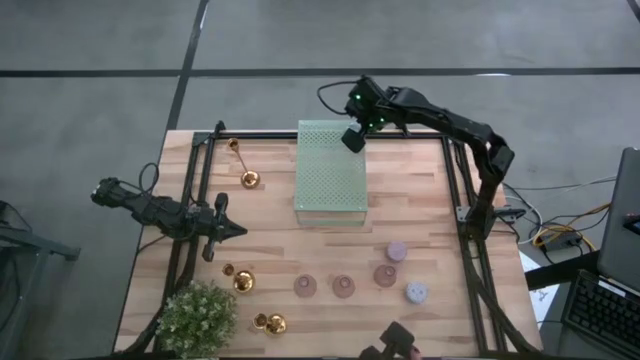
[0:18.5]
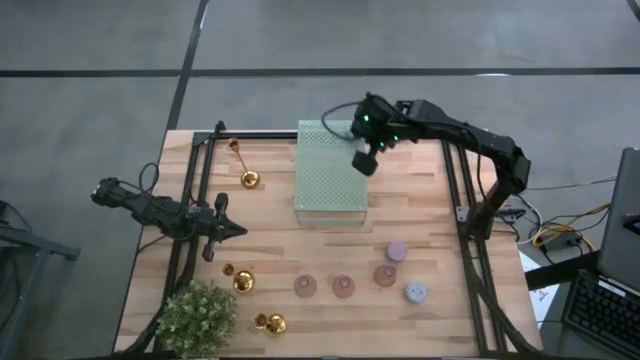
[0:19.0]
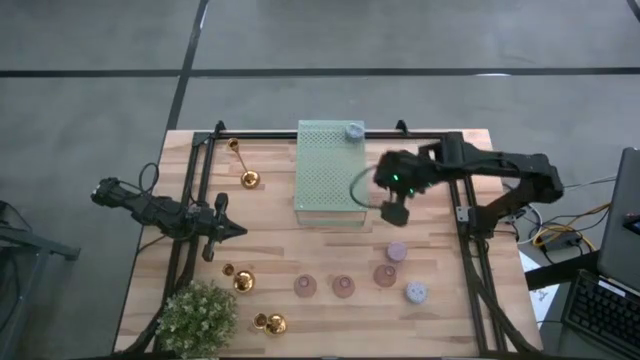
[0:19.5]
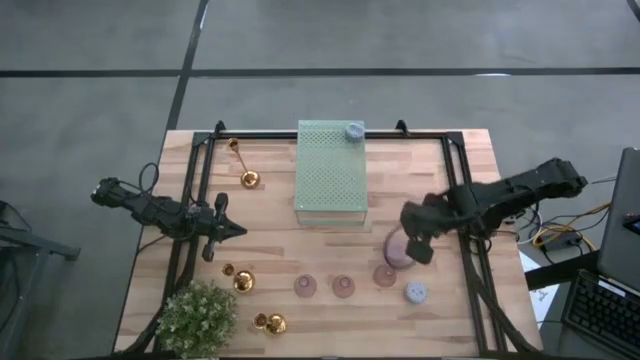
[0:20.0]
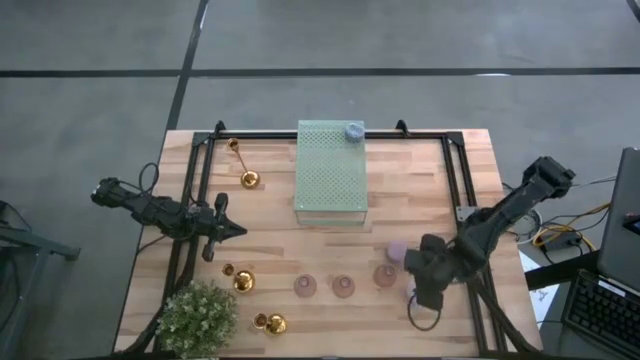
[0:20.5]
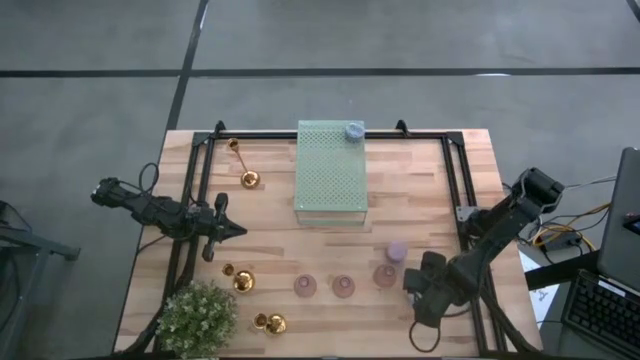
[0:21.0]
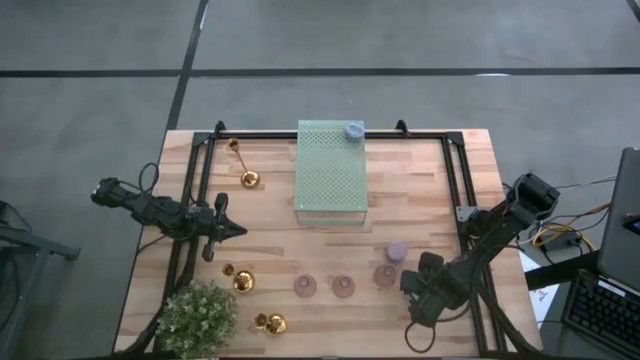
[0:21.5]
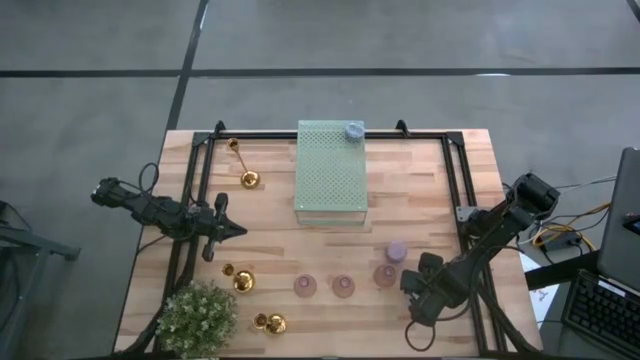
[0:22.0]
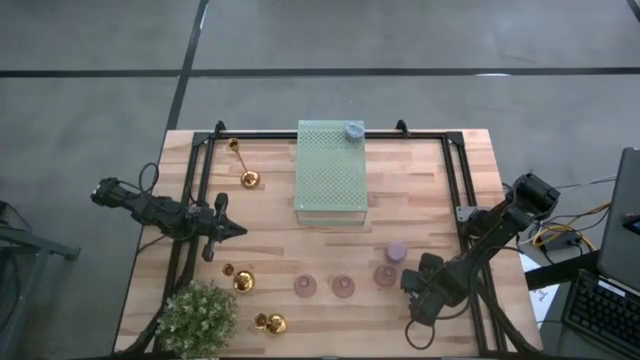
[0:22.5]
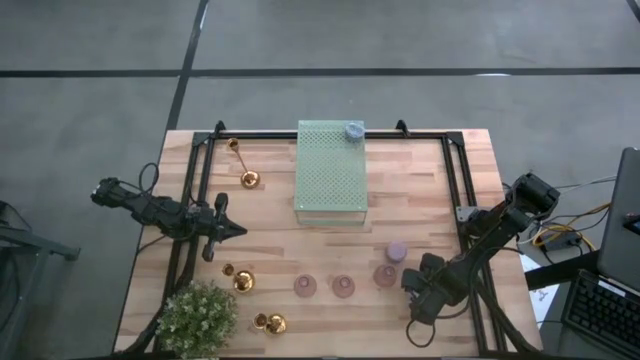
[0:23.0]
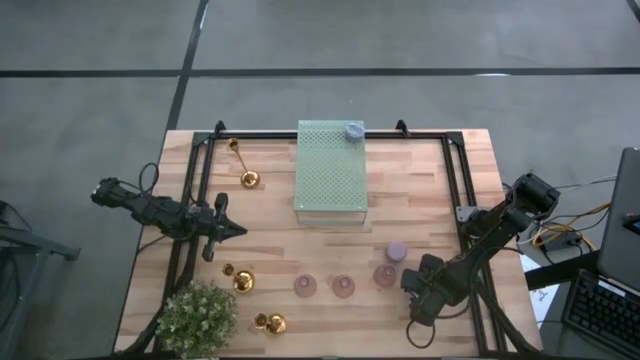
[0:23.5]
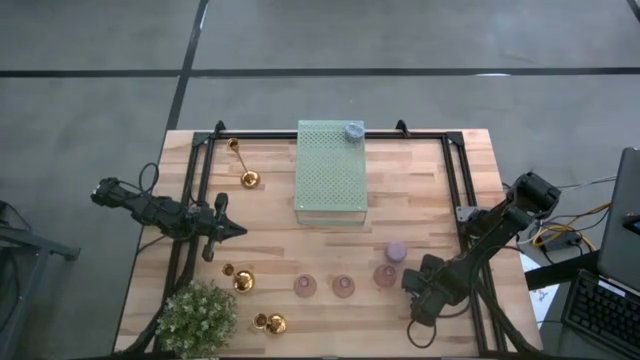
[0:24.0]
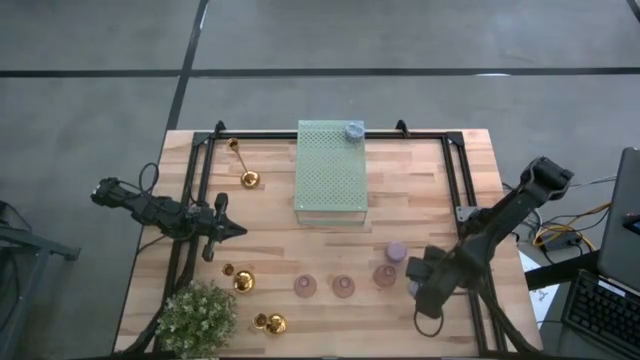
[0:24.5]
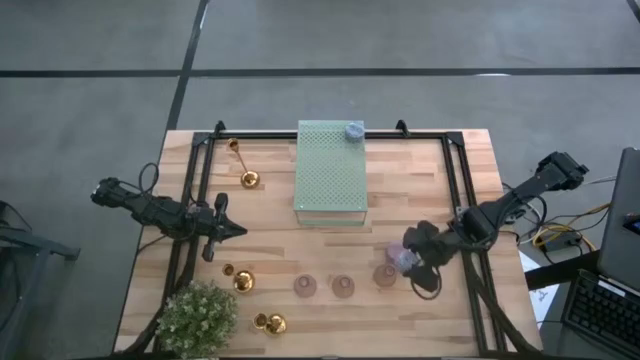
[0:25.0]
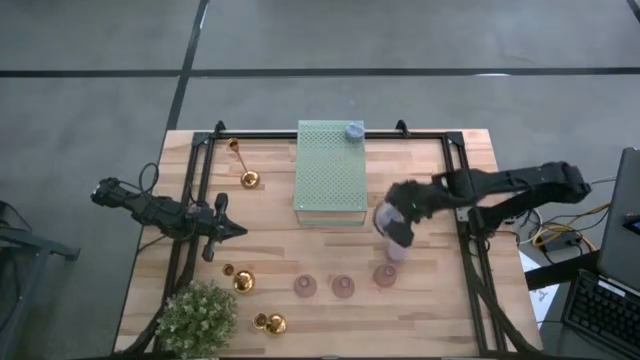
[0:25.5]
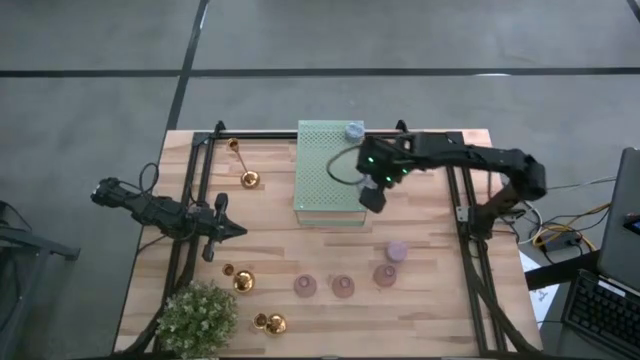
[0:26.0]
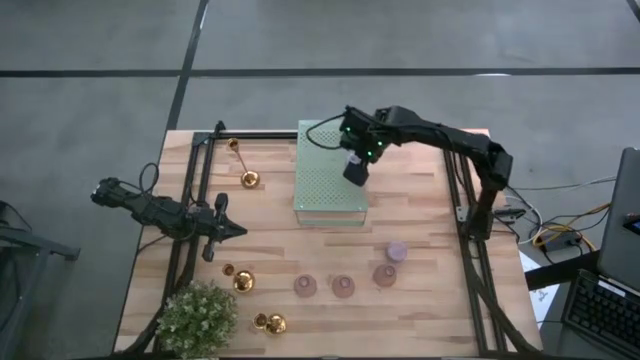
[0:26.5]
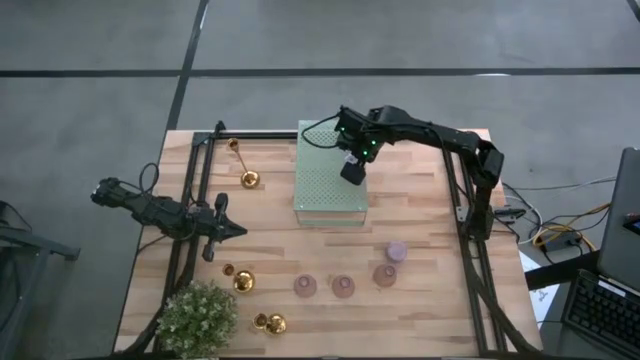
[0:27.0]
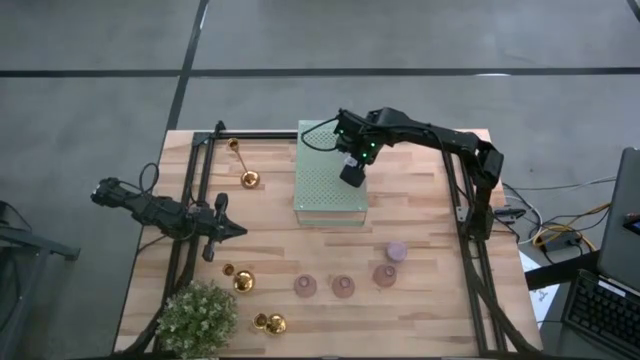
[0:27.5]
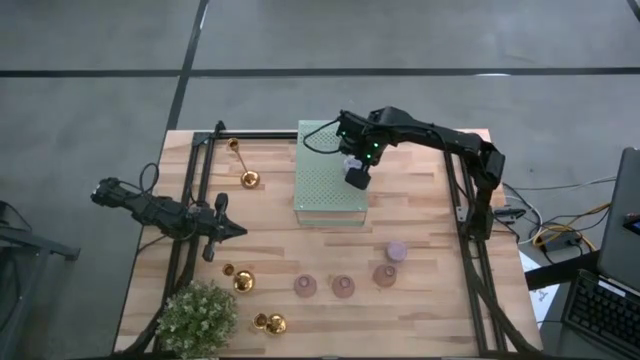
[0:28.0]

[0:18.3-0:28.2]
Task: Pick & Place candle stick holders
Put the white scented candle on the shelf

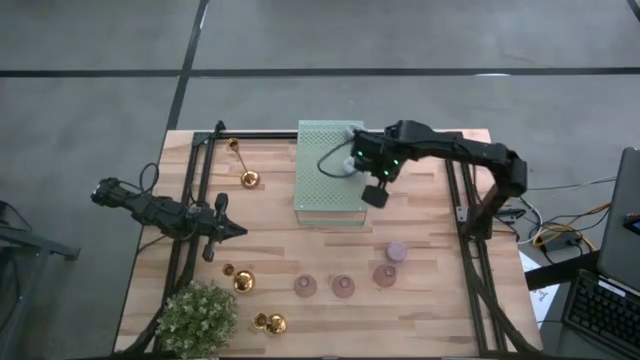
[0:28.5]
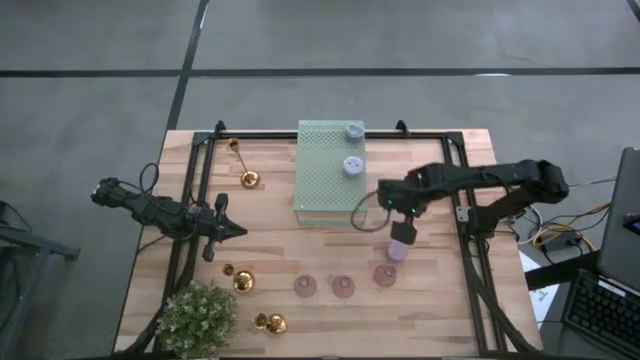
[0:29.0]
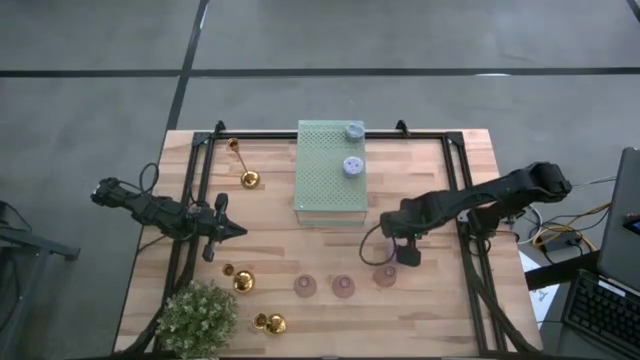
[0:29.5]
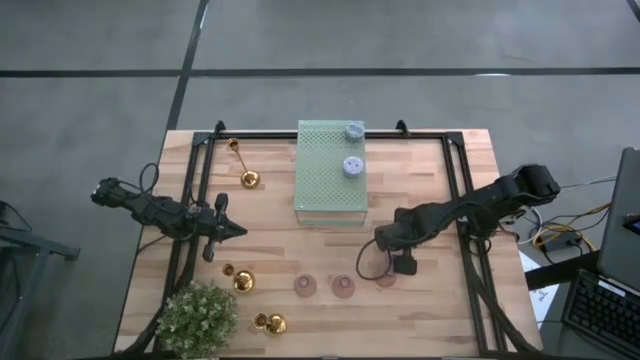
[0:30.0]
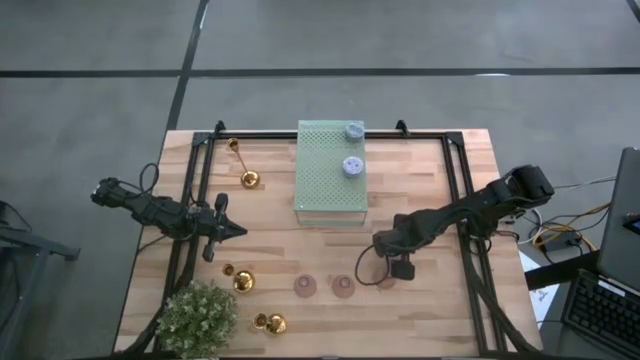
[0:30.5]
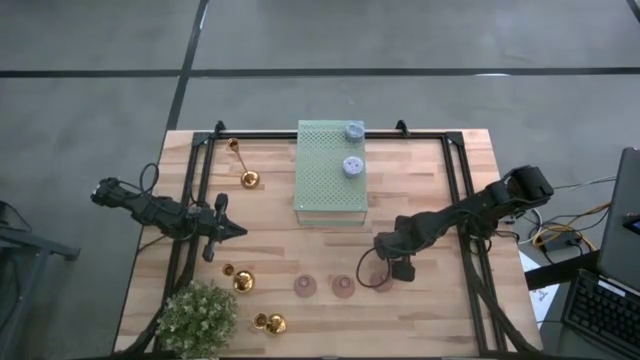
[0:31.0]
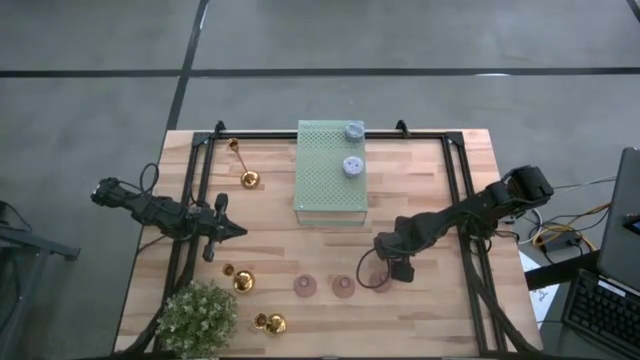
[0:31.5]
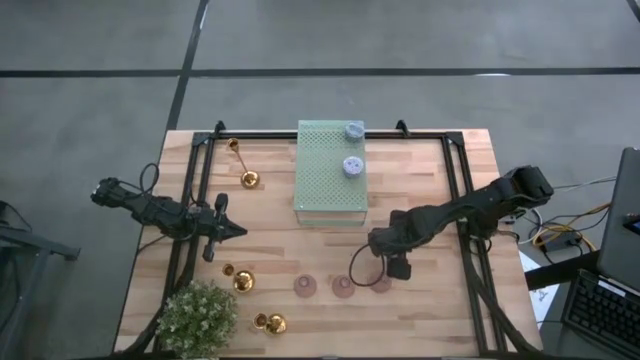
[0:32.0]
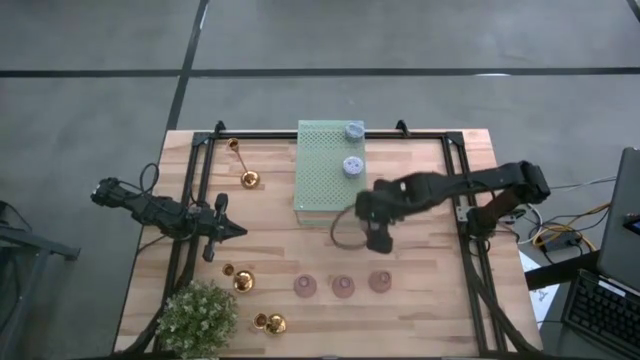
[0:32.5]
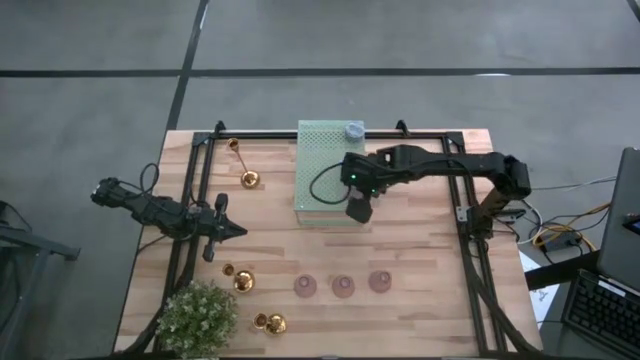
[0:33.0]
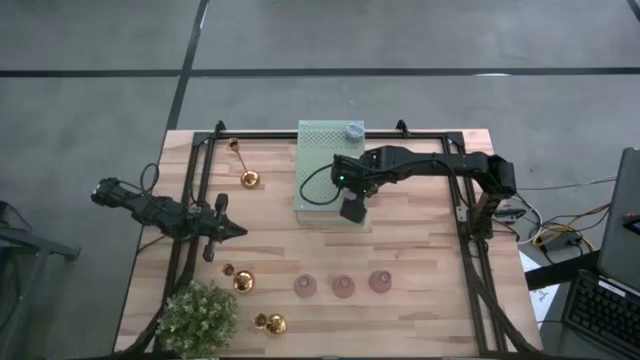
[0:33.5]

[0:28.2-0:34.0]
Put the pink scented candle on the shelf

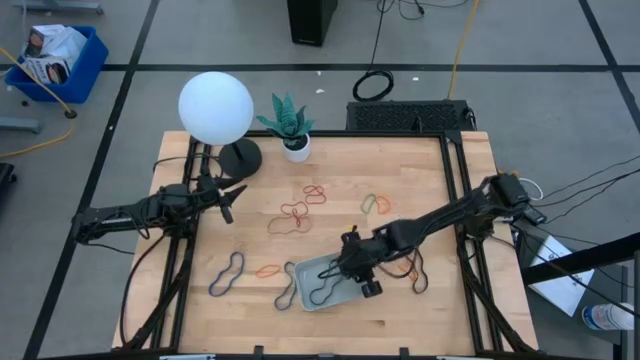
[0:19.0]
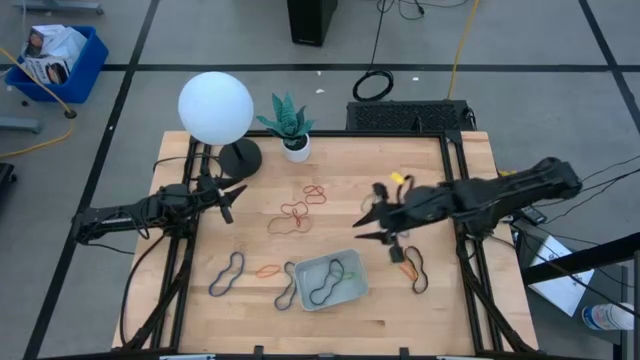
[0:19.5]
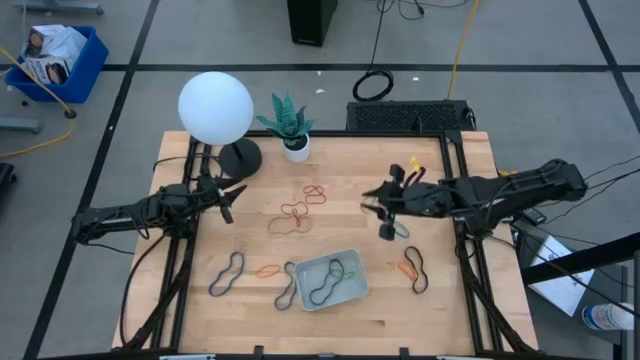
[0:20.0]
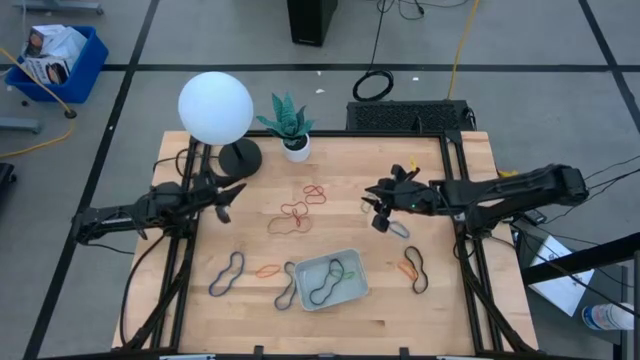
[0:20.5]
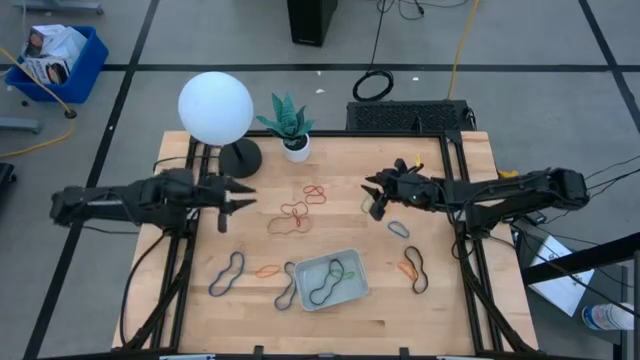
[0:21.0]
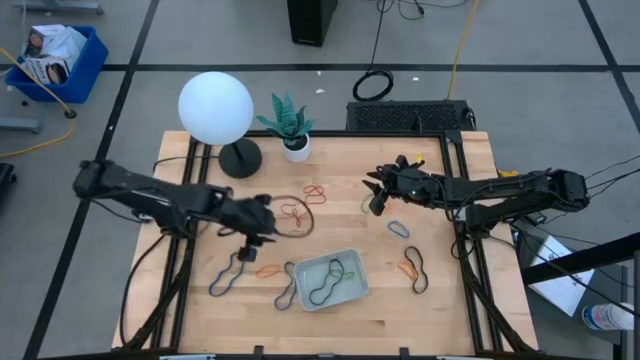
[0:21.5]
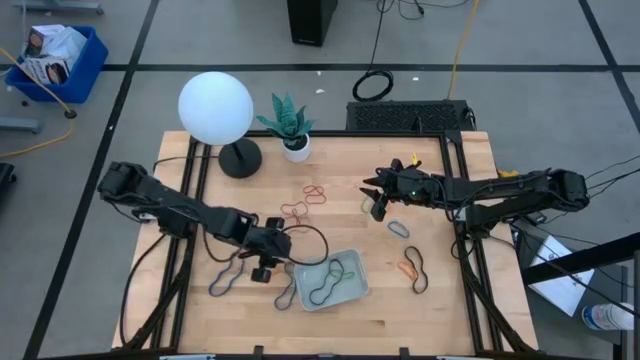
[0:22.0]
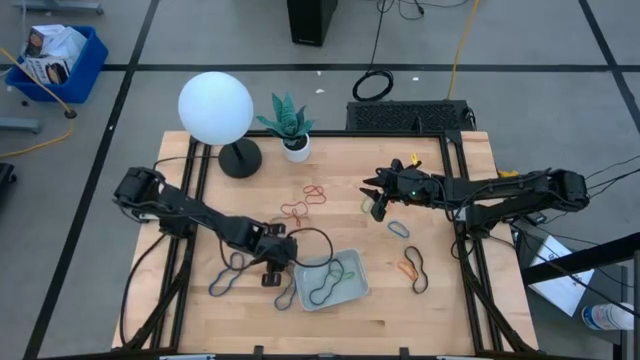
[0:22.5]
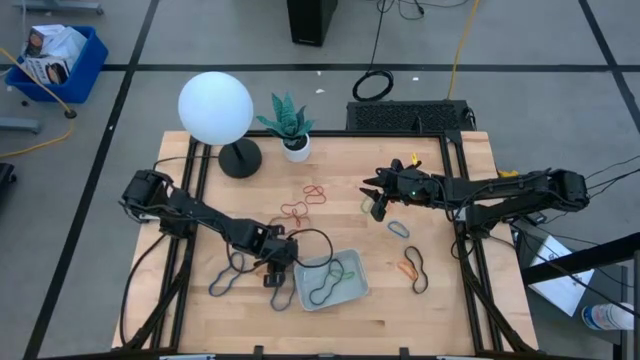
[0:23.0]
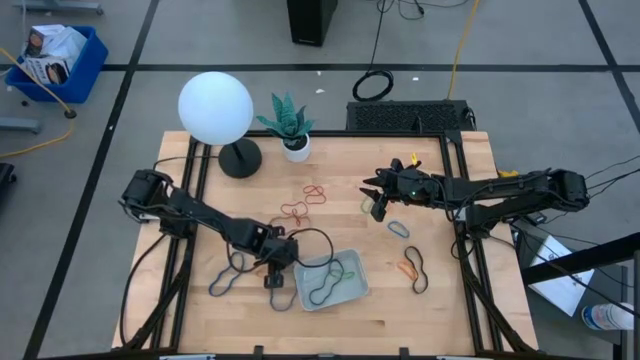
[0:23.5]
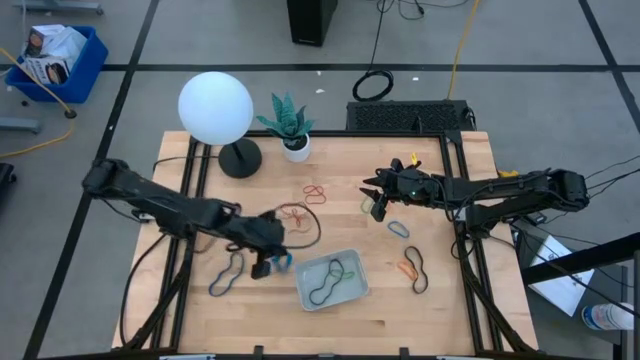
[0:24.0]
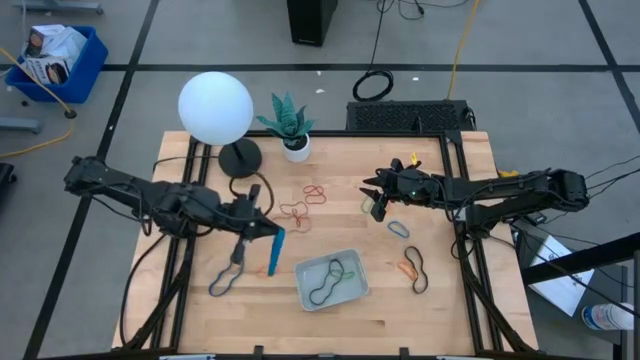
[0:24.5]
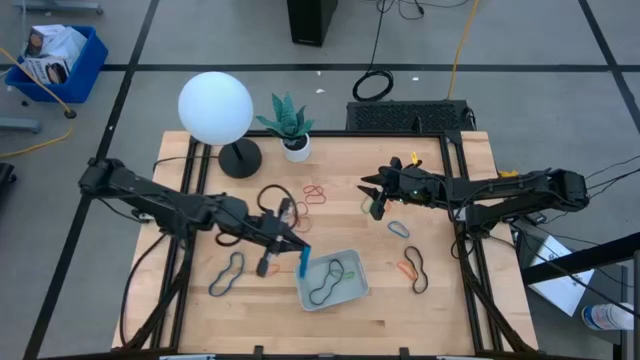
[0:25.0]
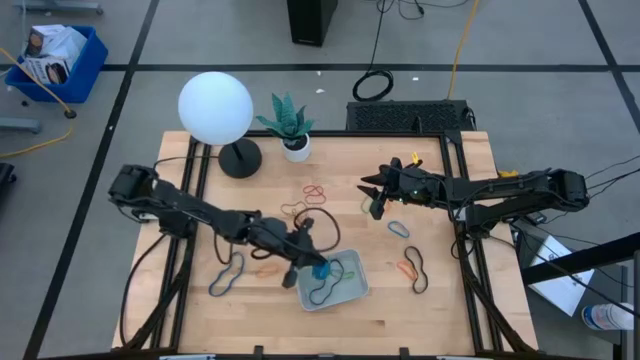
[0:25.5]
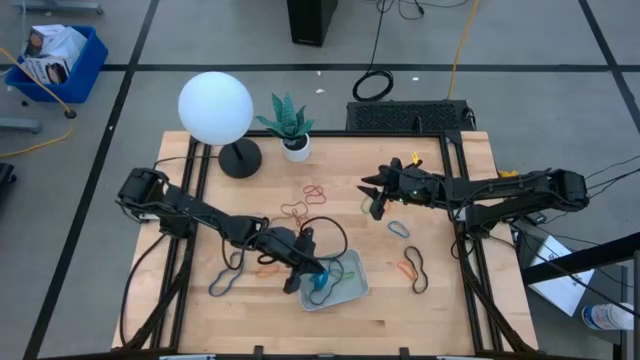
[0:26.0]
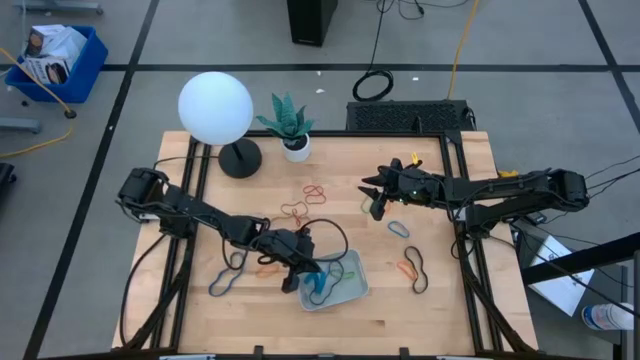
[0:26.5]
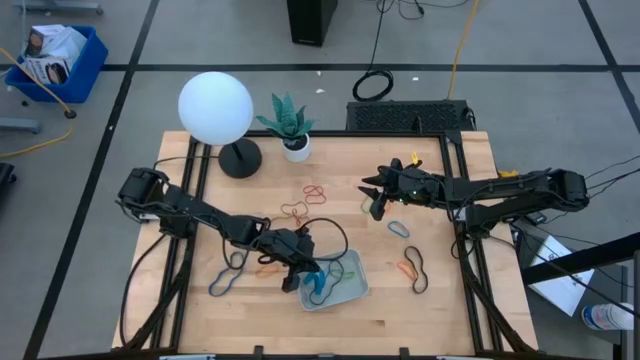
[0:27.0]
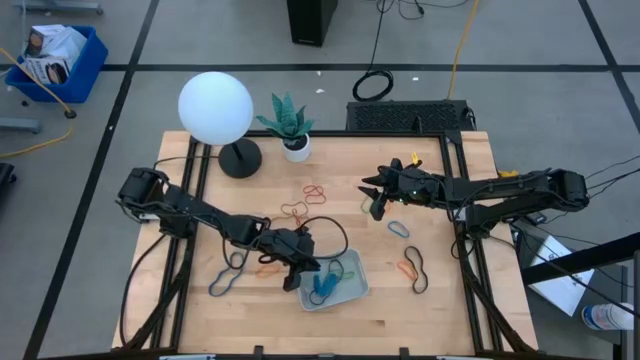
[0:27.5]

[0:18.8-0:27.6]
Task: Pick and place rubber bands into bin
Put the center blue rubber band into the gray bin
